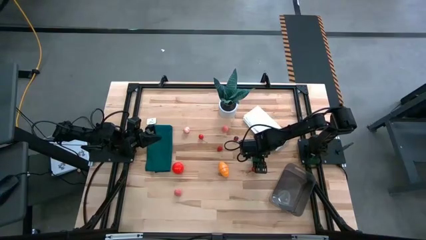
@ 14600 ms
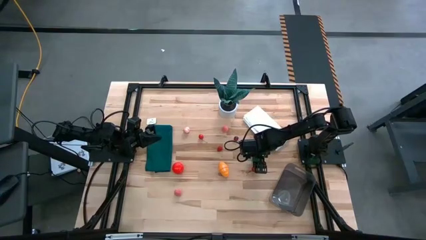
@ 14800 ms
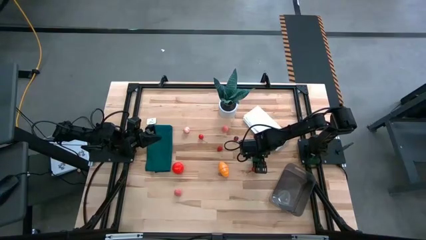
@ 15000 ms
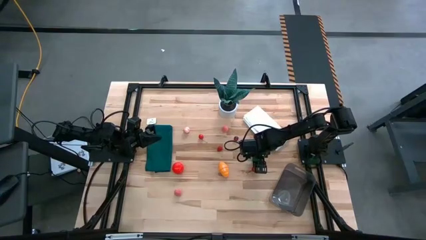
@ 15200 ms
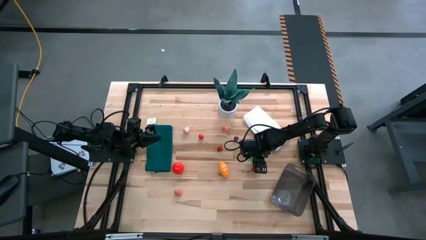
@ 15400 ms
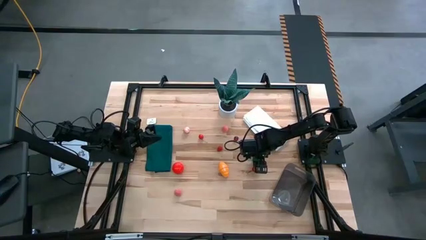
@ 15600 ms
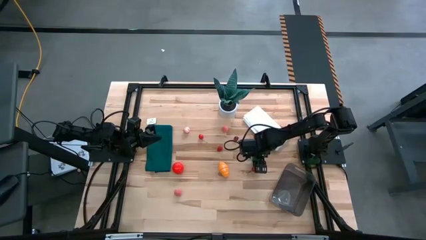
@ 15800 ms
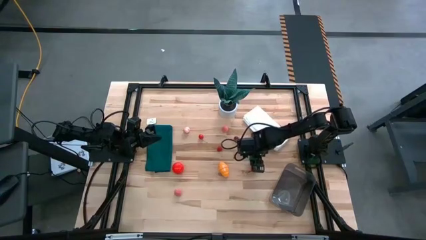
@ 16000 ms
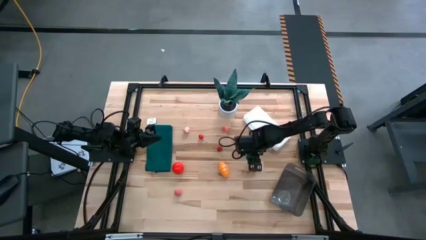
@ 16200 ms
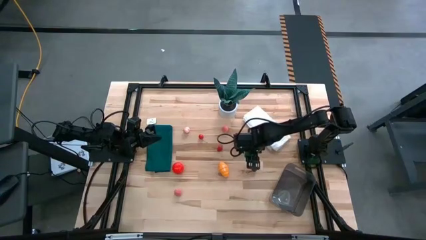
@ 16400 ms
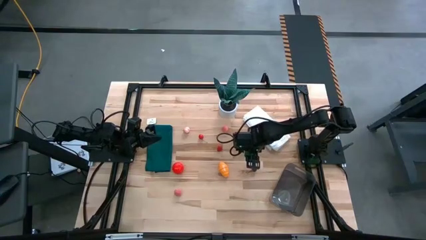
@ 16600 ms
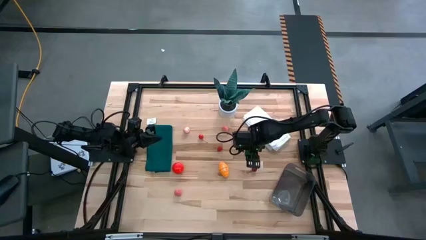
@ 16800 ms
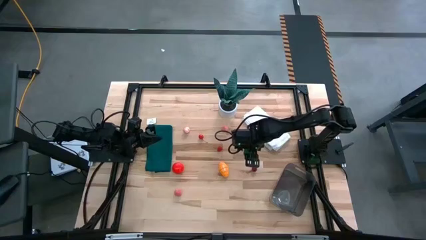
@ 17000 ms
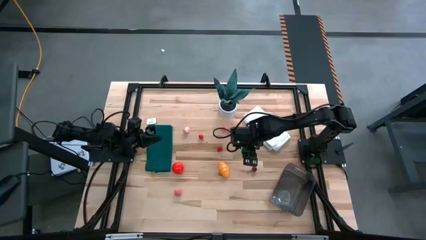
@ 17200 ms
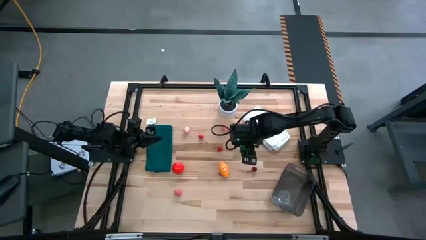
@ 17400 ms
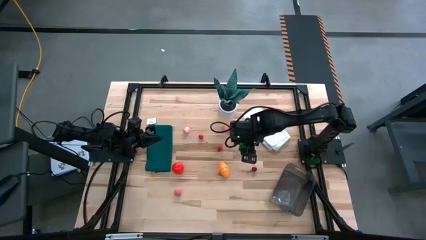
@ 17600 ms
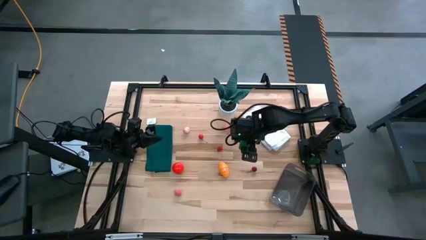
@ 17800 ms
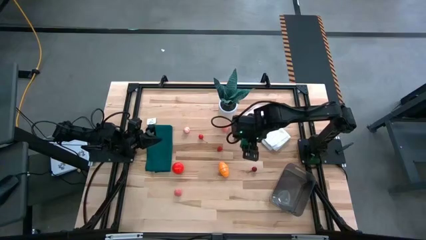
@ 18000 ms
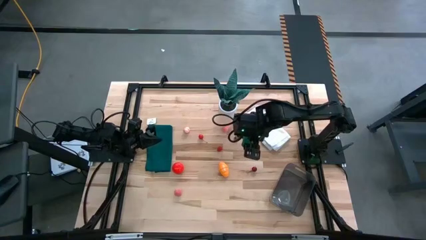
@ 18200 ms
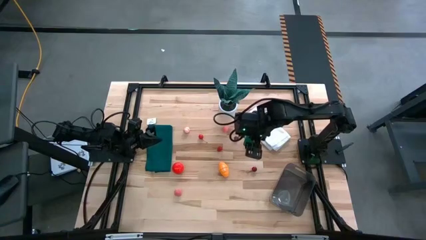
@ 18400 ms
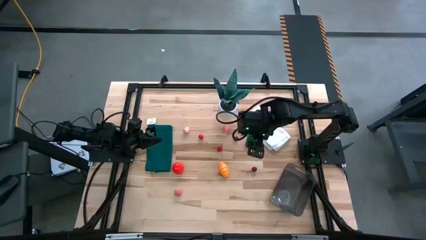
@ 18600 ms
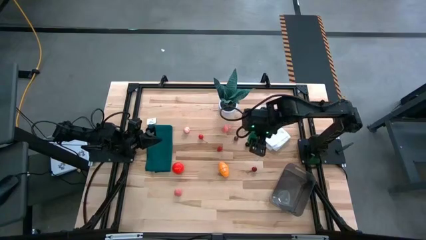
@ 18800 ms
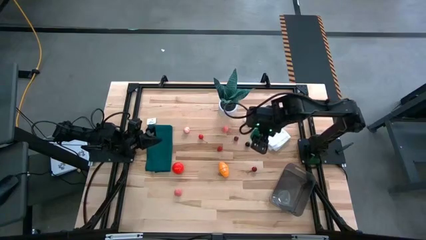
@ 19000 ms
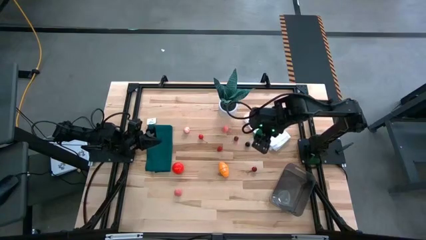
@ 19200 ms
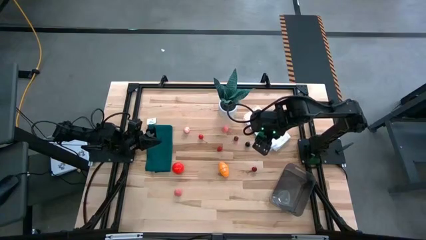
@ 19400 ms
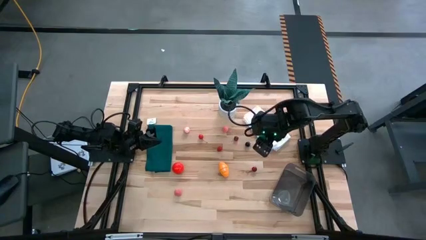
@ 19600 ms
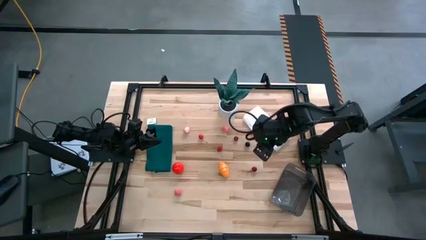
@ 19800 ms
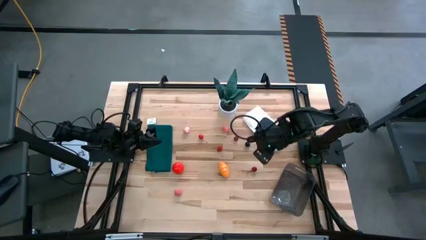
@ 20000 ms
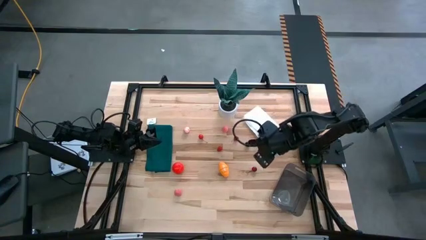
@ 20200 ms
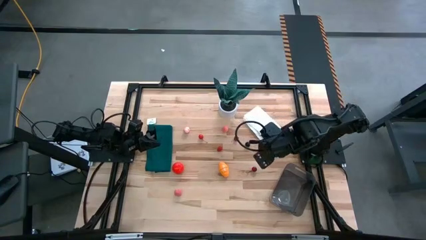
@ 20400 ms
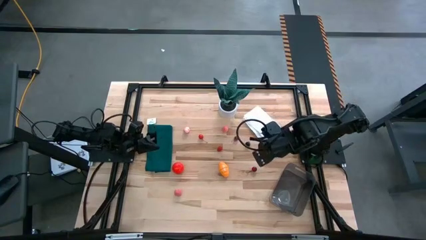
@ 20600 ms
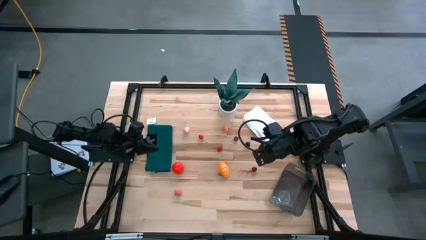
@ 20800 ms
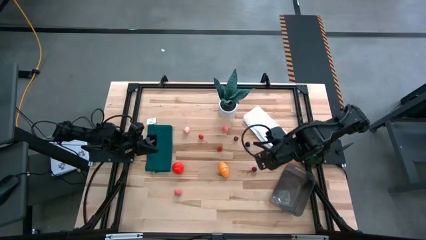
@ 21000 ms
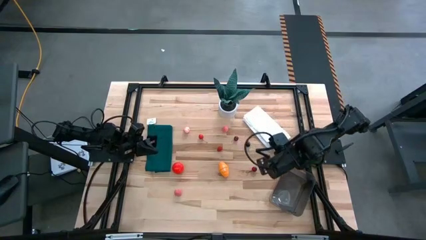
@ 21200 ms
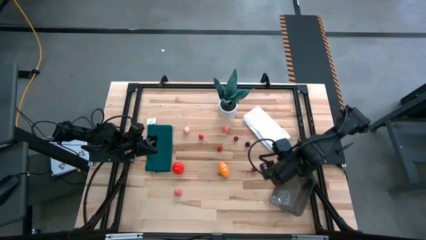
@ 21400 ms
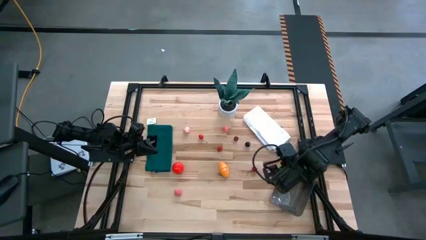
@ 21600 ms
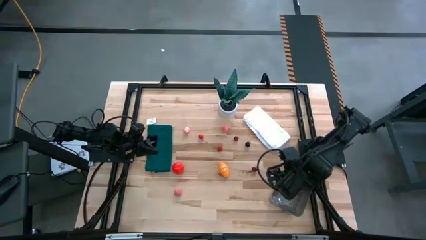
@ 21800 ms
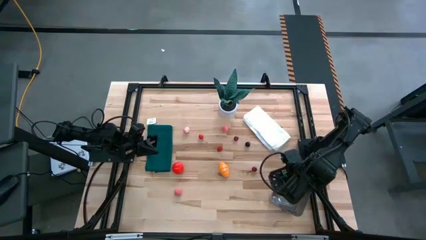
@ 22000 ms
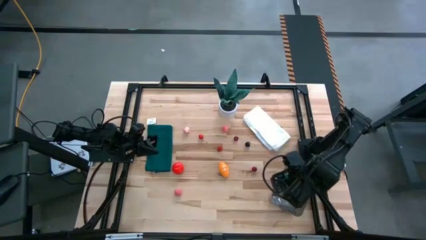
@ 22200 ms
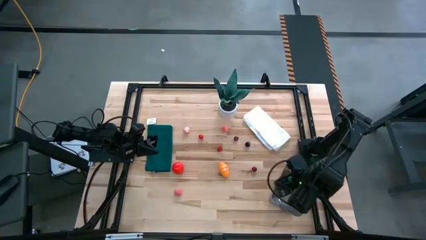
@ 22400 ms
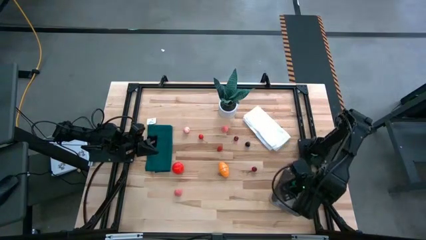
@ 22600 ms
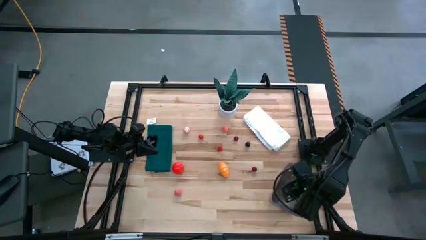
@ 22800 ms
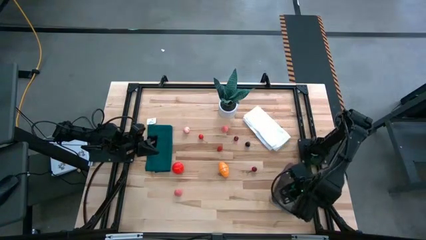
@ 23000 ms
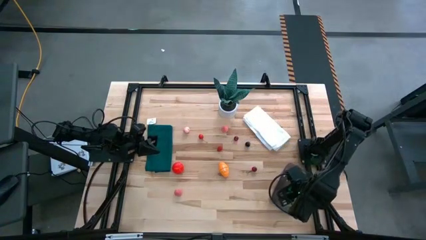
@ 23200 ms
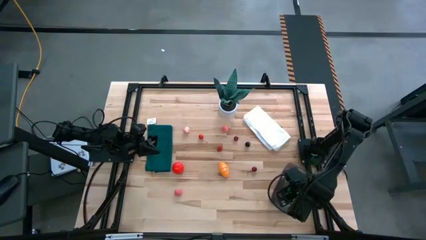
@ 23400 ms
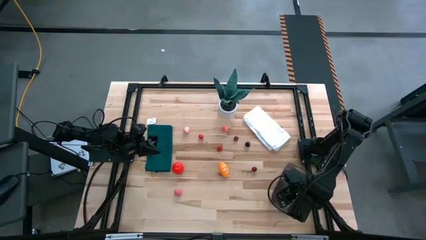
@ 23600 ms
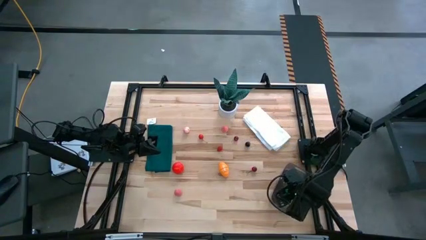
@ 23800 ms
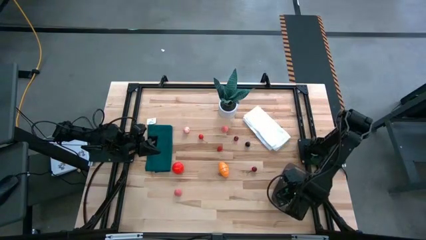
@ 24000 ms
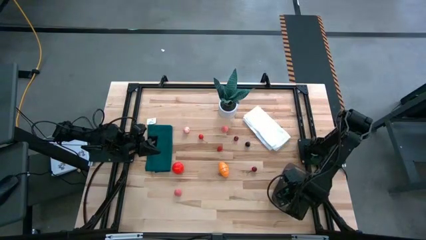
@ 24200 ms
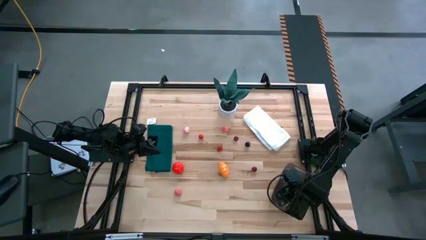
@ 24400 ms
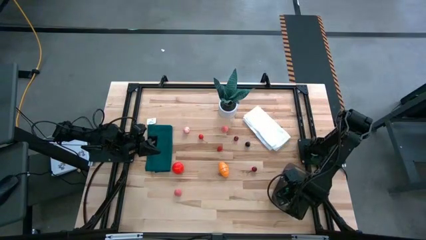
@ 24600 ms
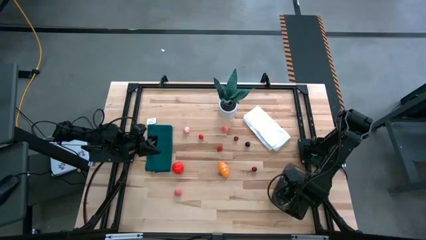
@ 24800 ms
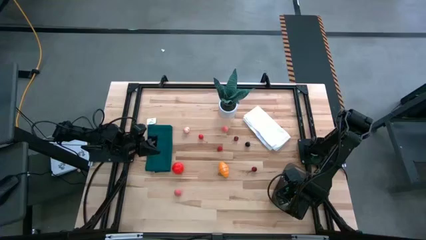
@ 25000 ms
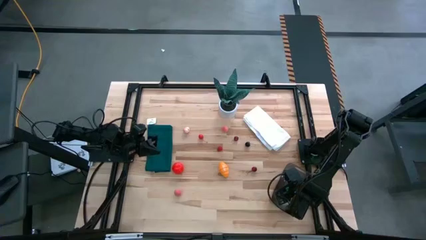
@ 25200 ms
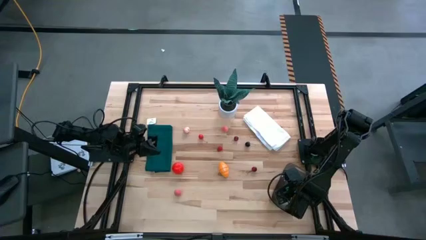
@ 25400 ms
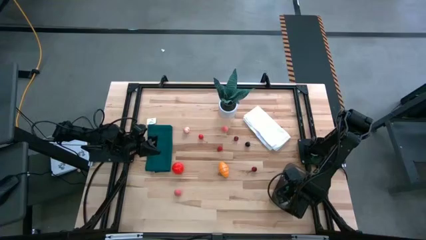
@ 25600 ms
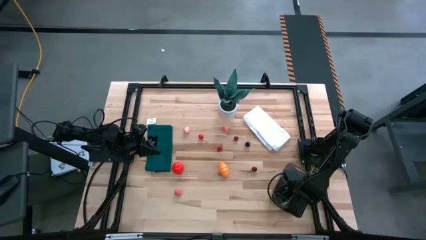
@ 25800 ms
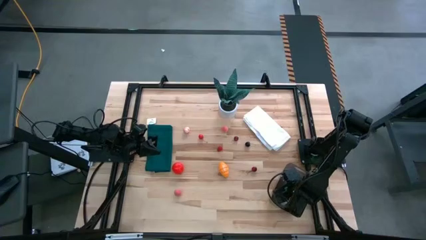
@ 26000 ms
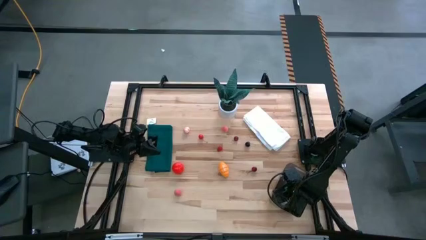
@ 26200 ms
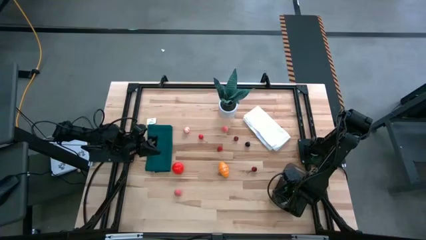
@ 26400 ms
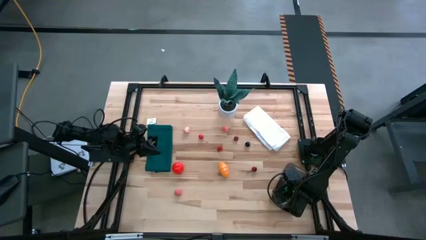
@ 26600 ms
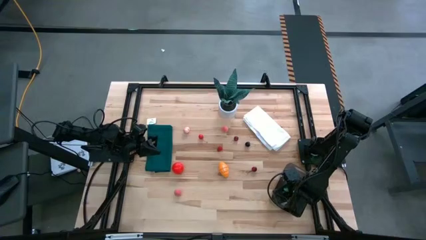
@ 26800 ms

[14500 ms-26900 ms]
Task: Pick and placing Produce into tupperware
Put the green bell pepper into the black bin
